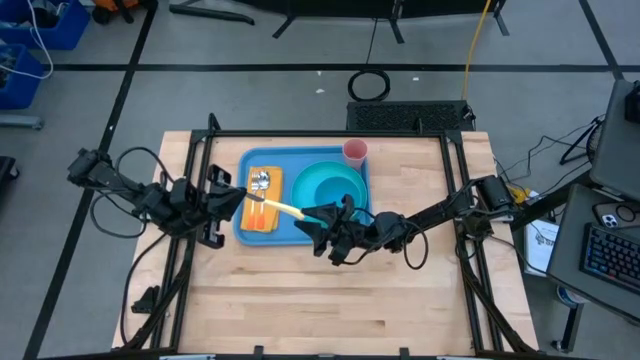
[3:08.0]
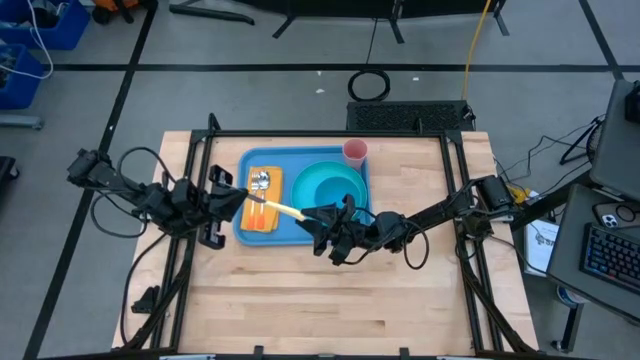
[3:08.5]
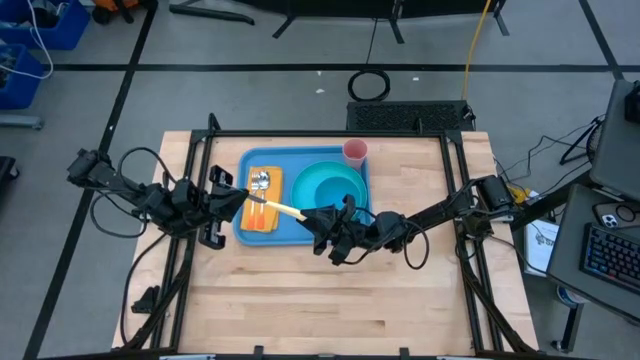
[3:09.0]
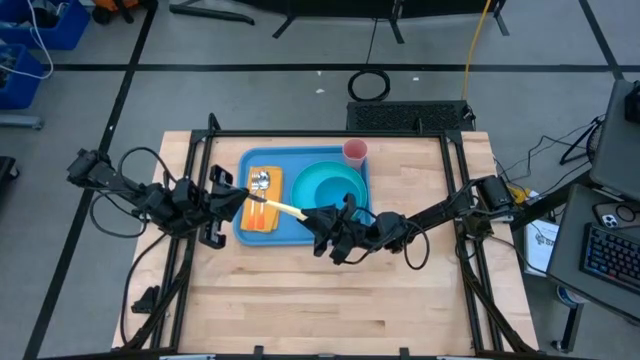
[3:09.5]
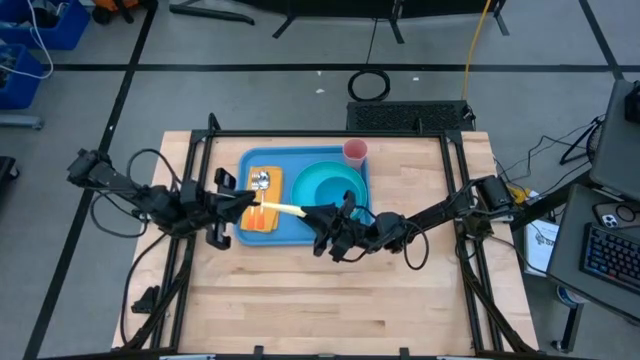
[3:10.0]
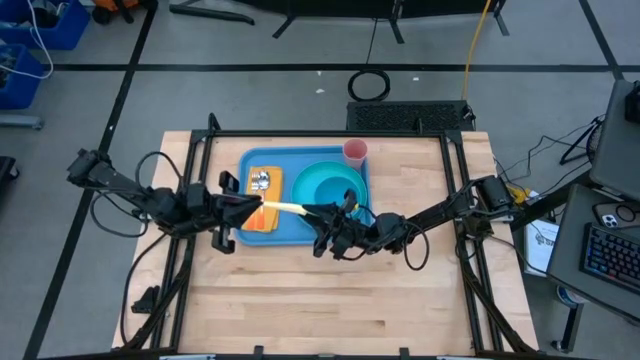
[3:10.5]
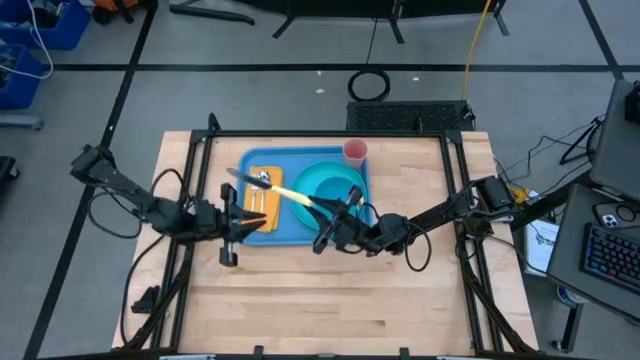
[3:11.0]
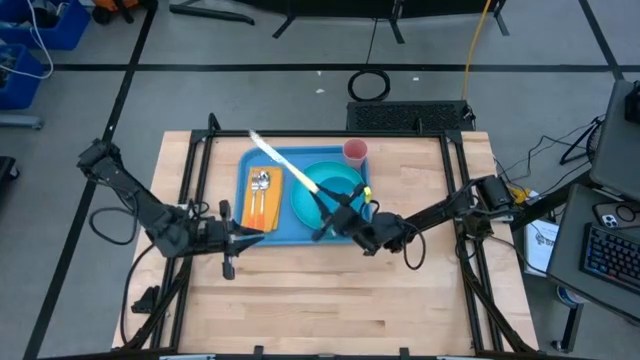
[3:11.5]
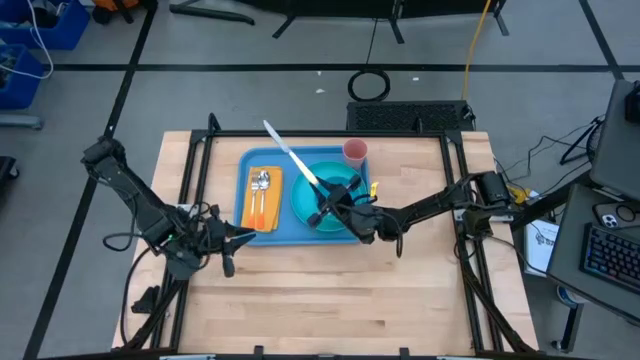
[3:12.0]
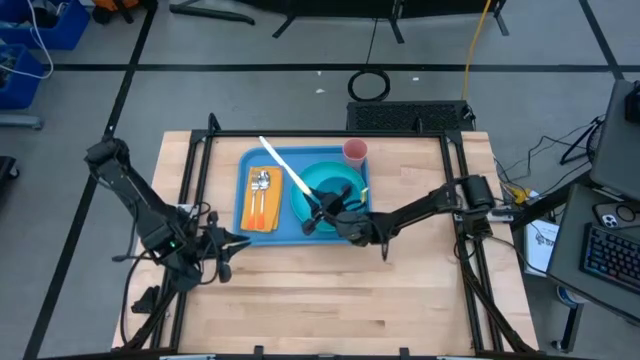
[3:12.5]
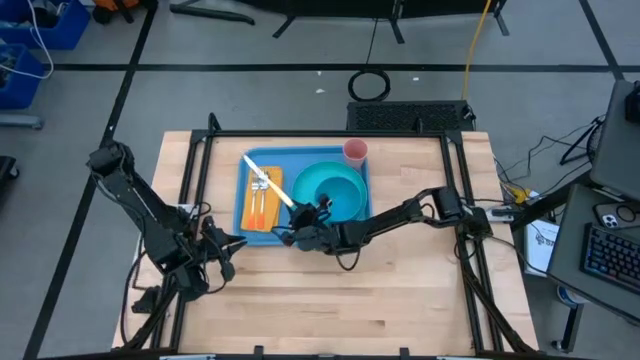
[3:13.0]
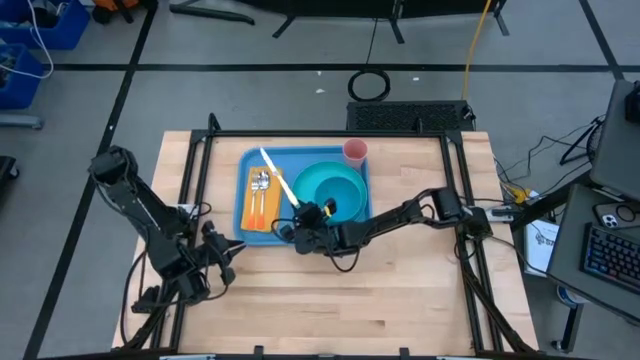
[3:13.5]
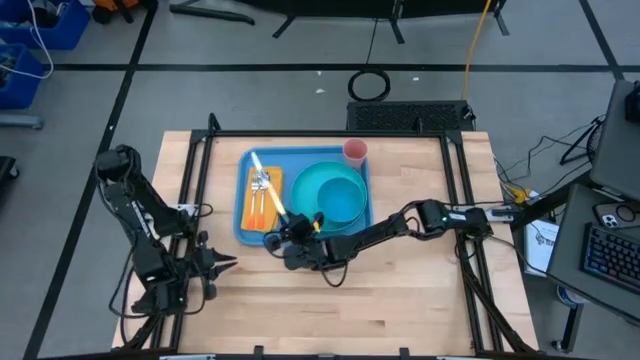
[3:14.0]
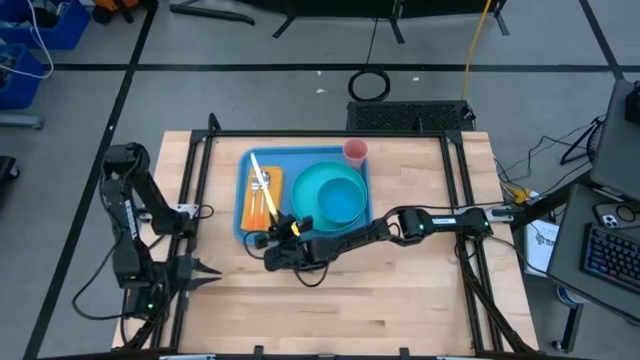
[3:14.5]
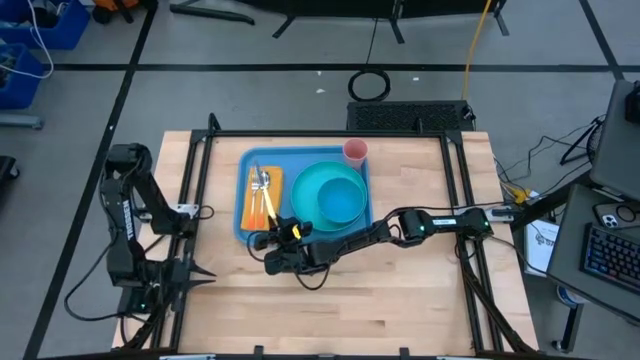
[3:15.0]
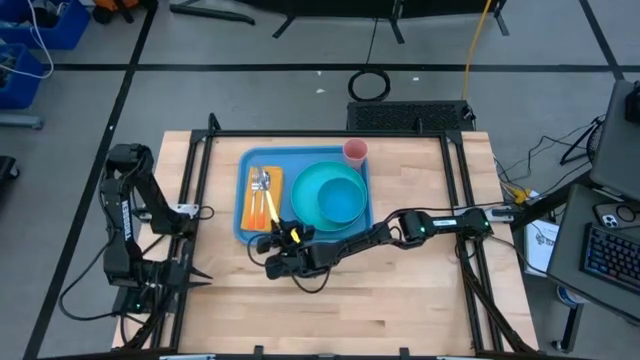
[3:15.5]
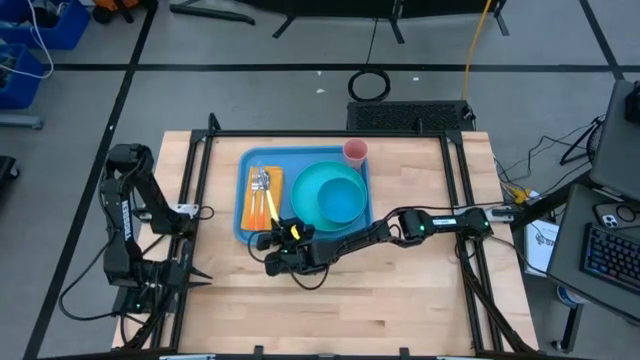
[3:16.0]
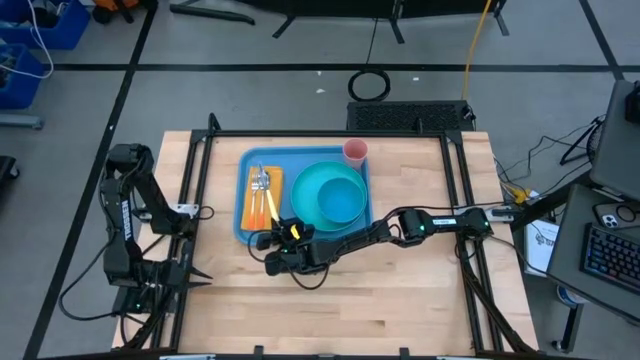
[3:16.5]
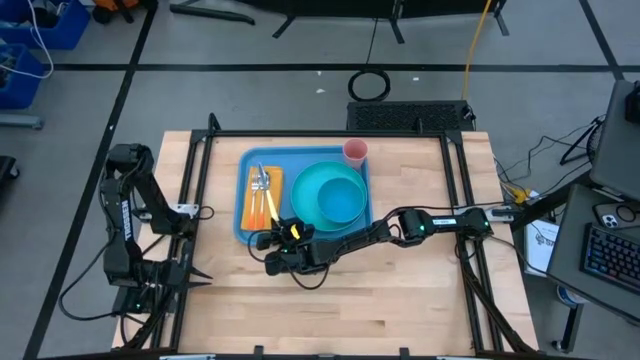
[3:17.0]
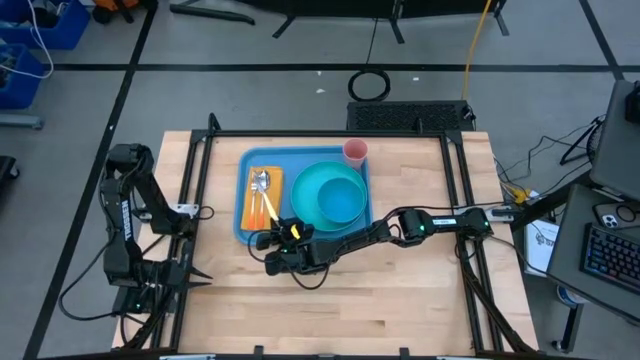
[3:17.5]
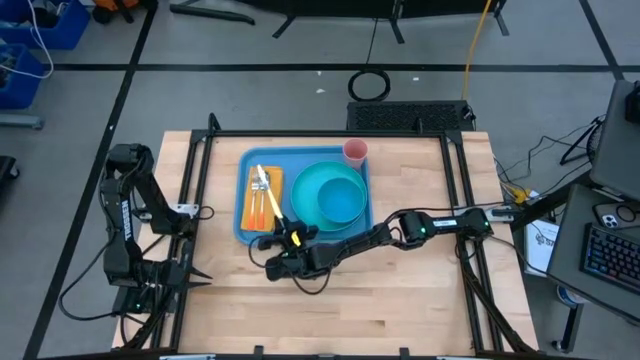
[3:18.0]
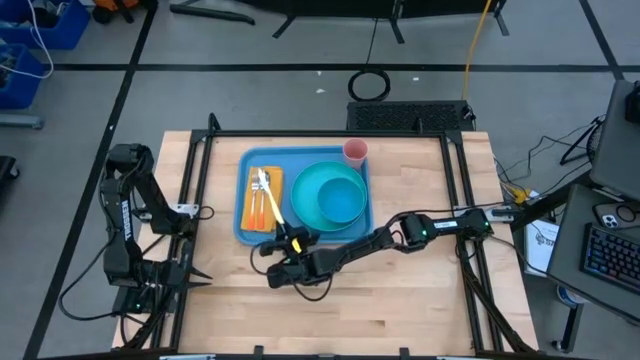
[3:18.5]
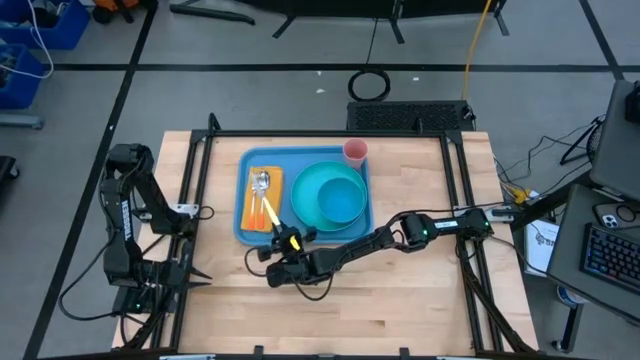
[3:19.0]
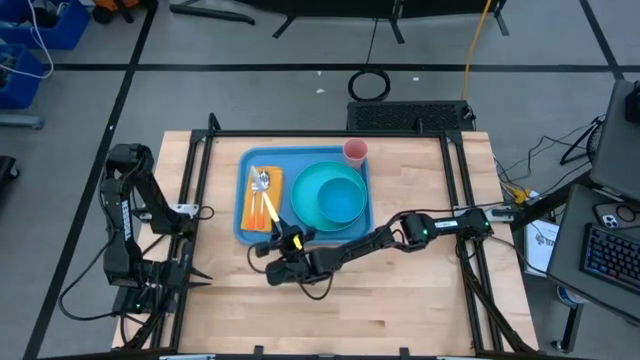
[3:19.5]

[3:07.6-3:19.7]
Task: Set up tray
Put the yellow knife on the yellow napkin to the right of the orange spoon on the blue serving tray

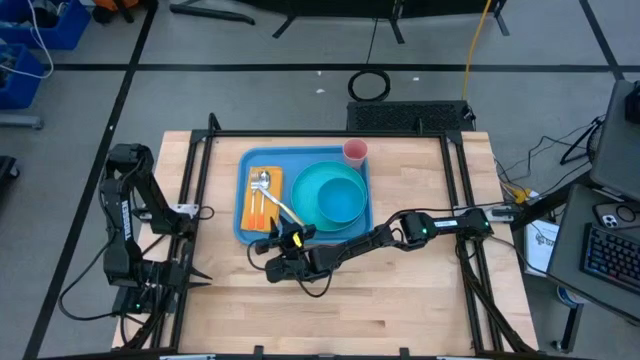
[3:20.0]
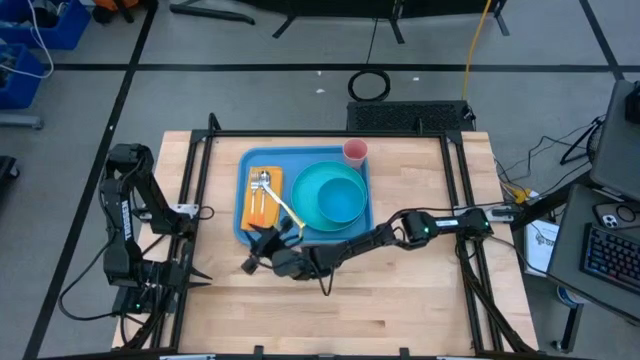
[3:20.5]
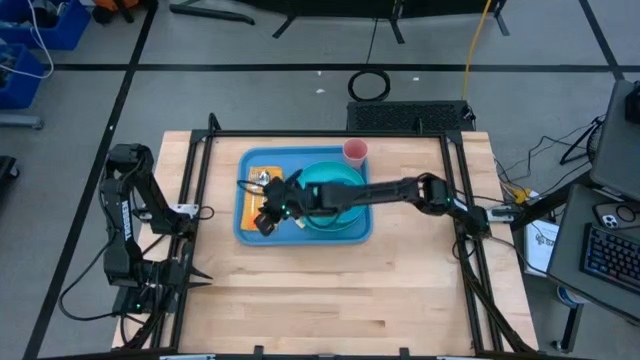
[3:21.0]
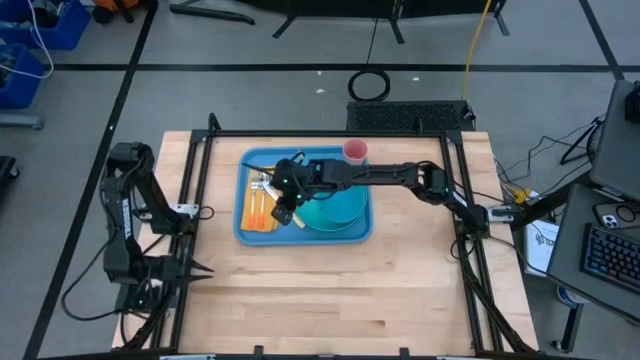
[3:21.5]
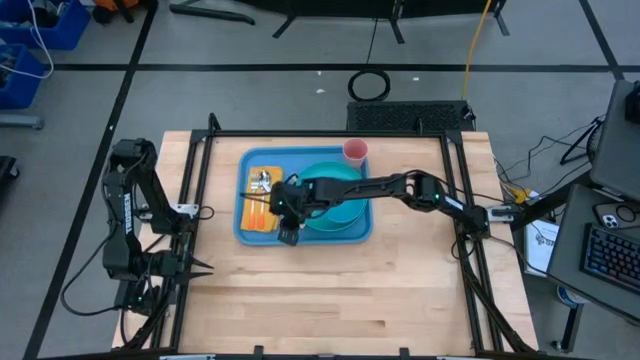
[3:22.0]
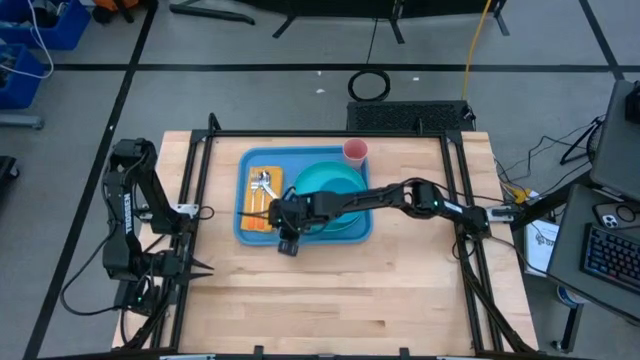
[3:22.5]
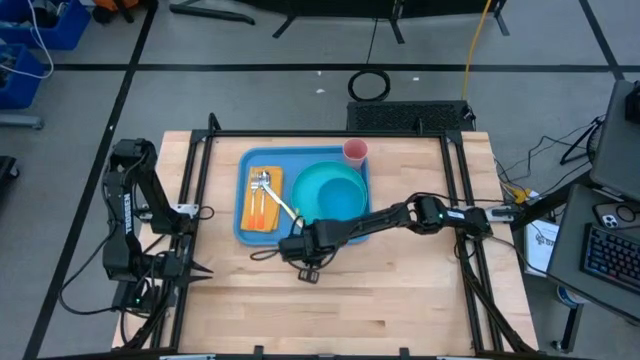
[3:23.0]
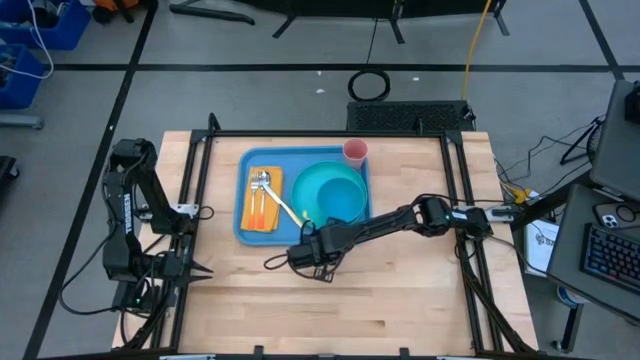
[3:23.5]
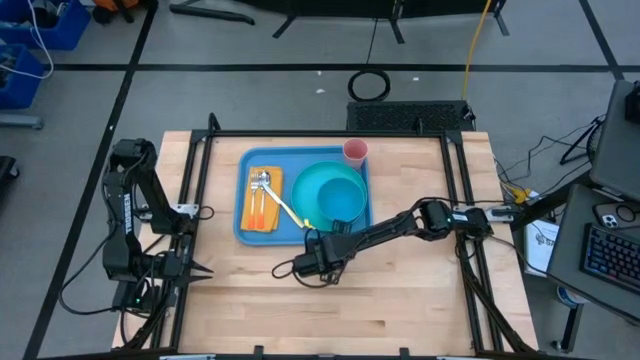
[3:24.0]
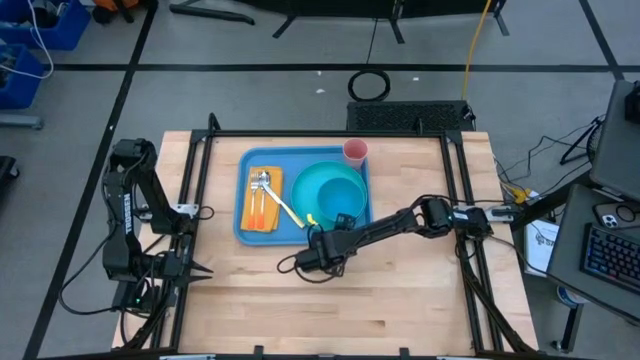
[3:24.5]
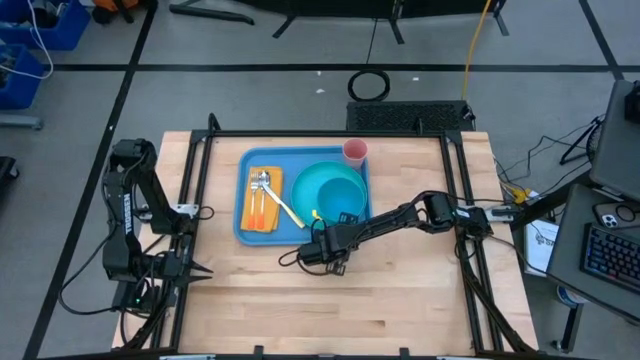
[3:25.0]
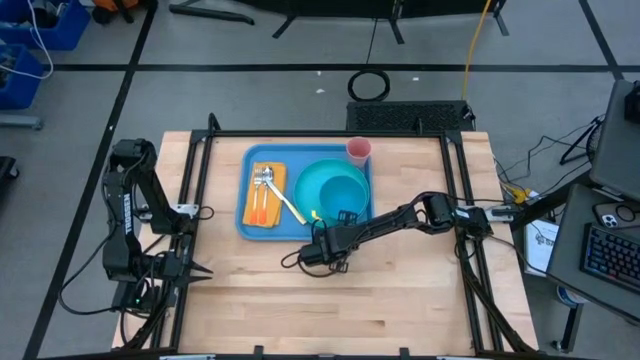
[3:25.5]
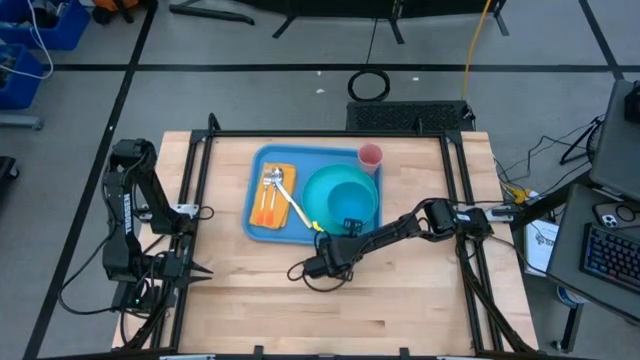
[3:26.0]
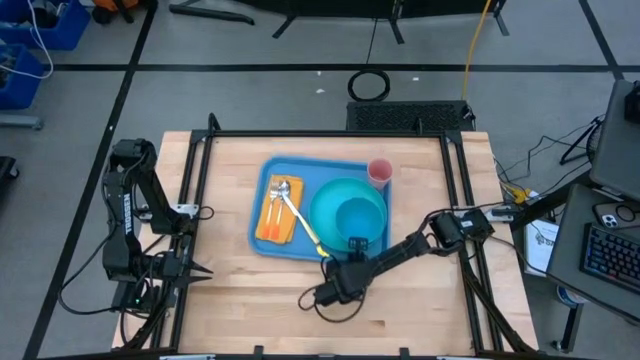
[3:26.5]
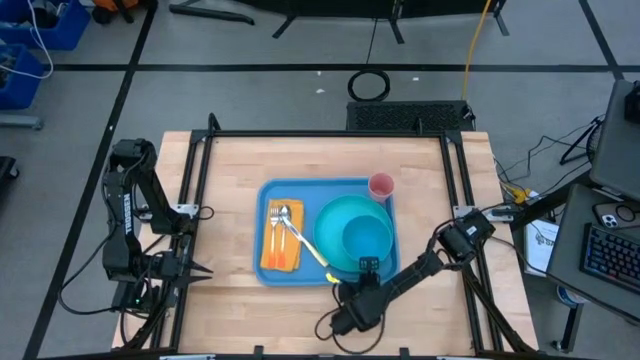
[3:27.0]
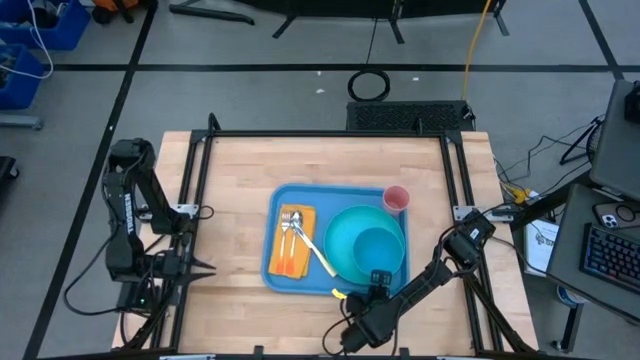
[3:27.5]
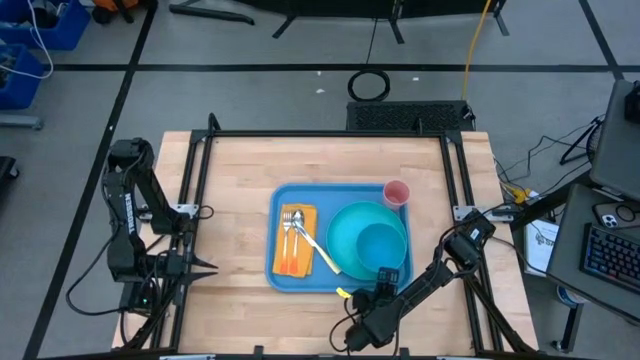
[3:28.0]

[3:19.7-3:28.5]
Adjust the blue serving tray
